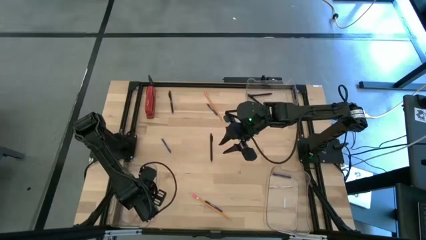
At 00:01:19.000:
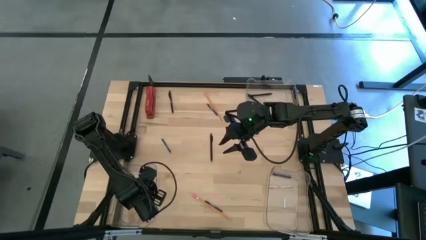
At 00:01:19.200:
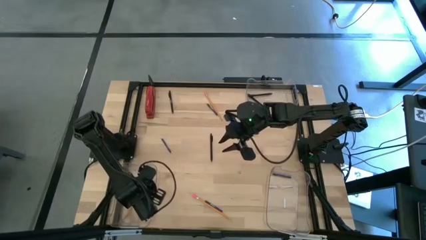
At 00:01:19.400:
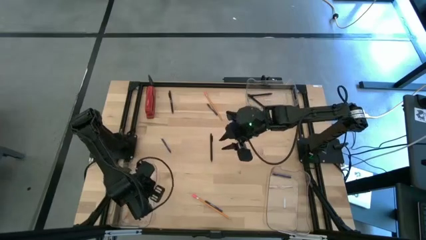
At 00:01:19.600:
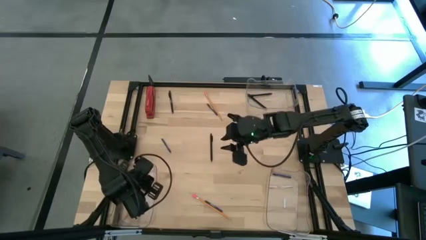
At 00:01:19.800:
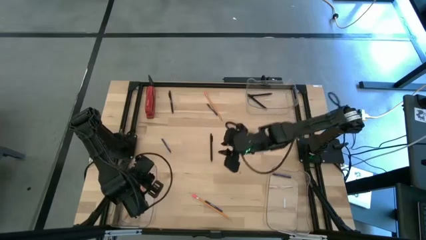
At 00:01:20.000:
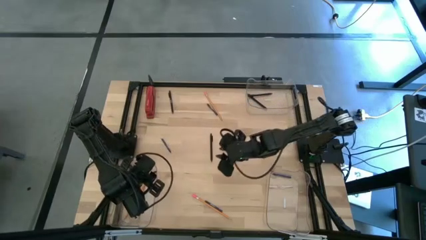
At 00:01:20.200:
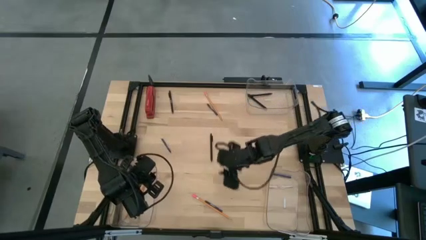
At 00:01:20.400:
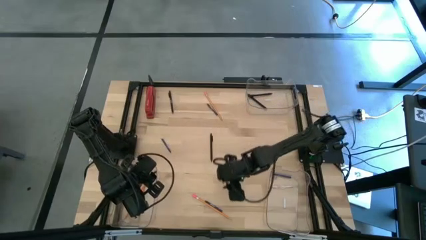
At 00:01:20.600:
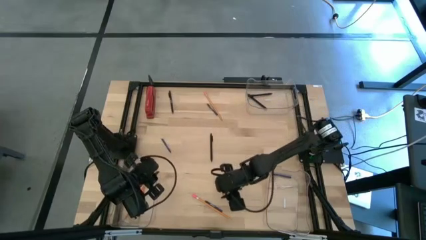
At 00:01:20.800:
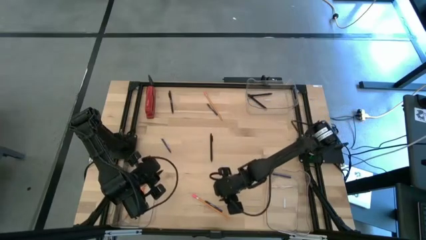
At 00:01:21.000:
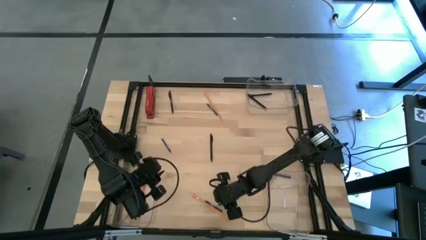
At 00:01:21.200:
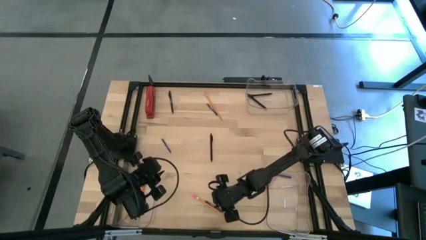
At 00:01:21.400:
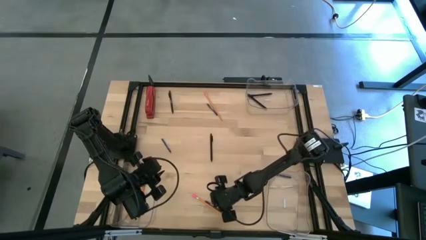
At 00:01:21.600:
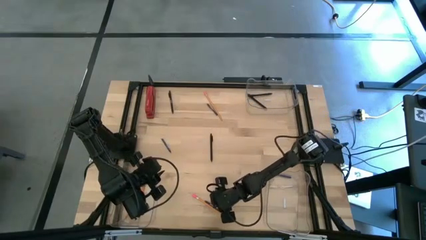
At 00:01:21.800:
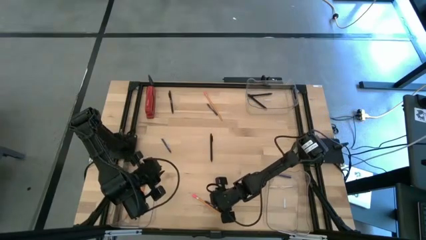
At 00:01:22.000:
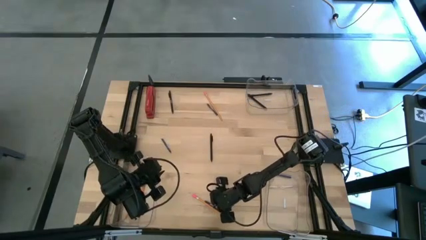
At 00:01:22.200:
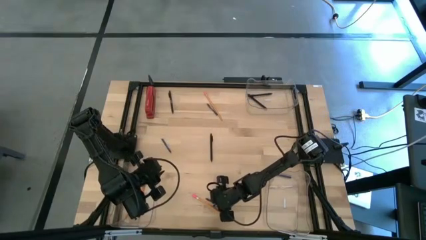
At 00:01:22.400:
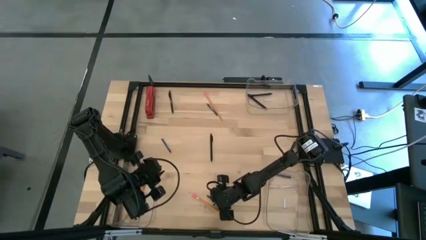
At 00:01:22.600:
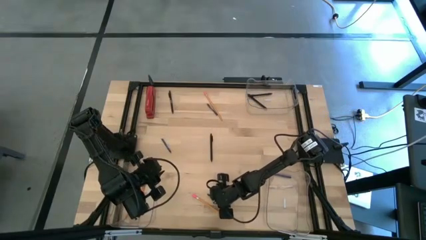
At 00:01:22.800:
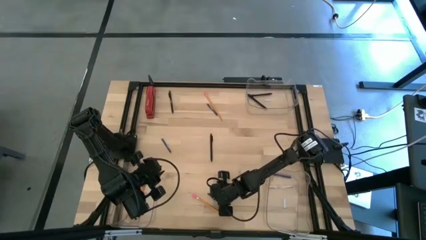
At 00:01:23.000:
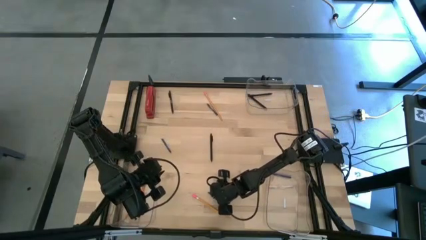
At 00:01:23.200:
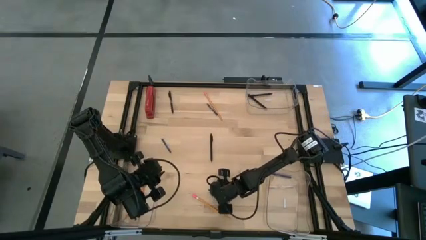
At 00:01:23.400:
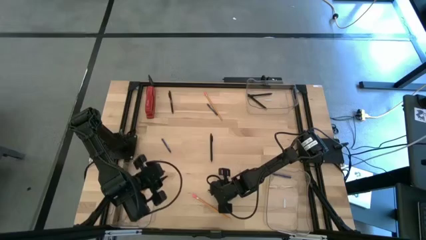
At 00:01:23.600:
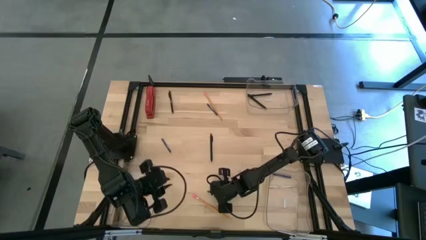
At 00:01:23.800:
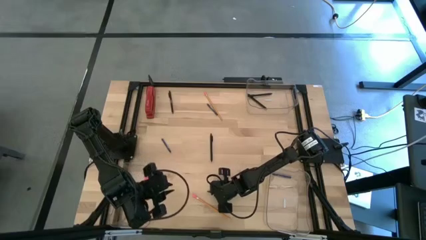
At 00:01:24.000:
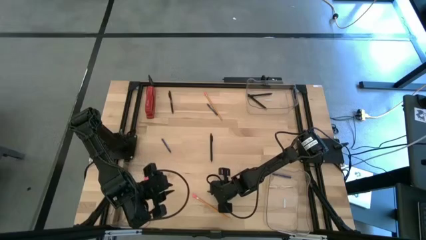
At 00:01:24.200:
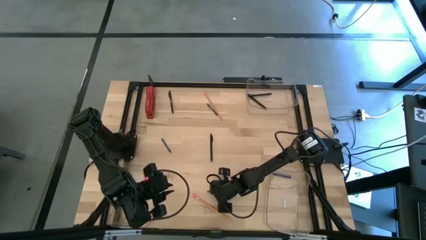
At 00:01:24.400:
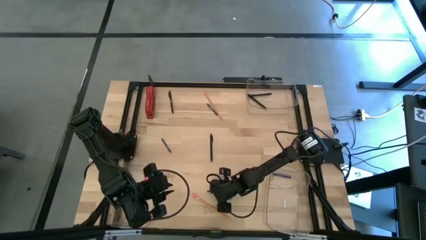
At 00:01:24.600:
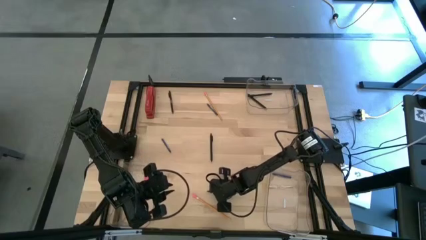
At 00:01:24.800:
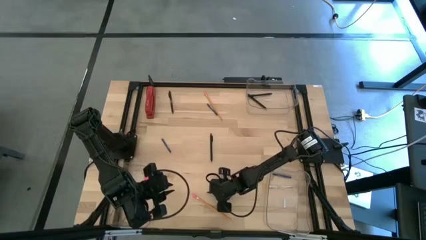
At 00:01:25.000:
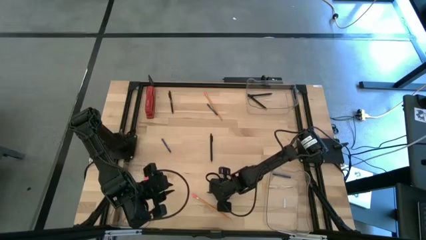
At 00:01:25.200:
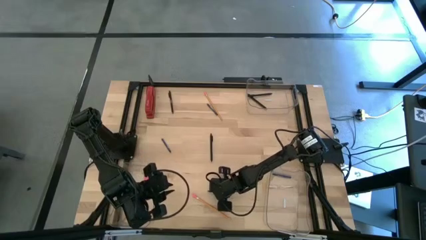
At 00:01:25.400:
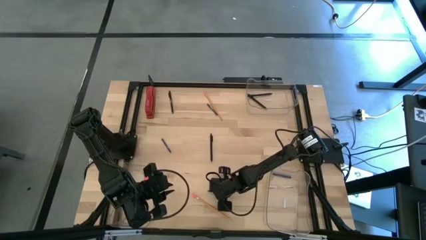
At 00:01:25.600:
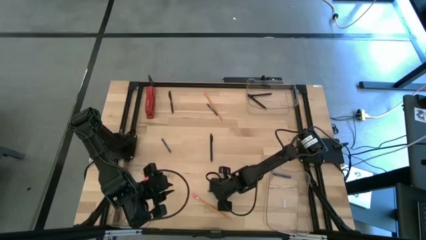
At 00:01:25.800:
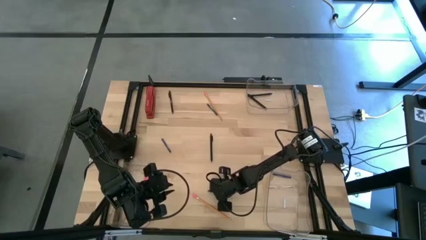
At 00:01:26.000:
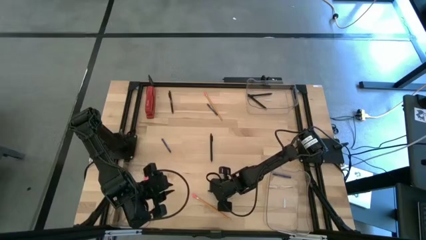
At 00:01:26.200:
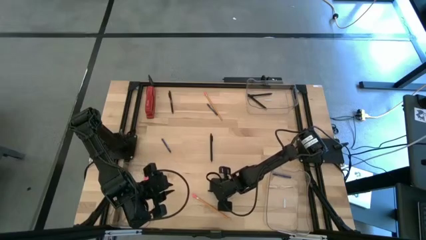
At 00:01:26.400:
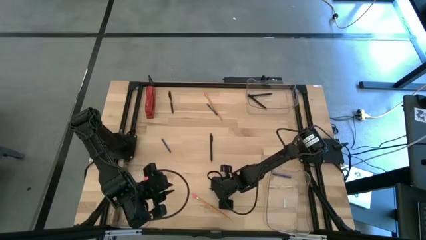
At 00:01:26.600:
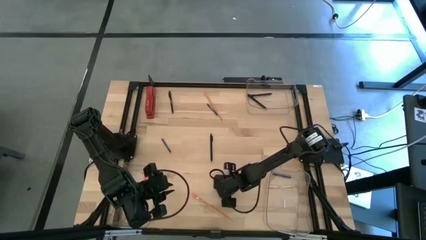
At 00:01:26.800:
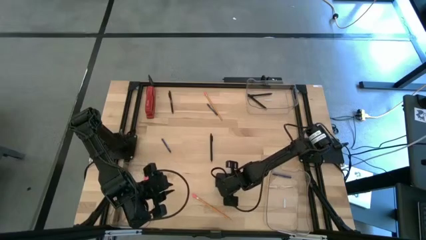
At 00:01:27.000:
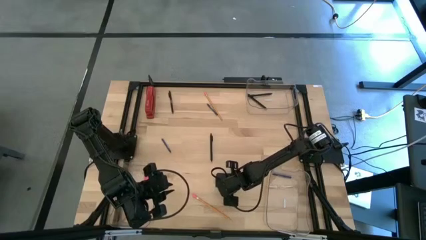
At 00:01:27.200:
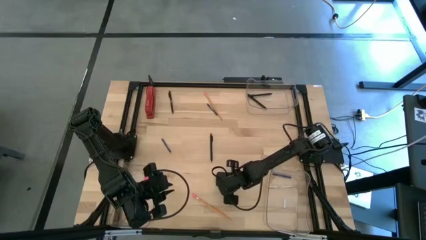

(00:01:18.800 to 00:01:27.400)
Task: Sort crayons/erasers/pens/pencils in bins
Put the blue crayon into the bottom right transparent bin

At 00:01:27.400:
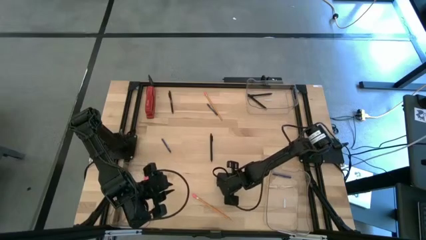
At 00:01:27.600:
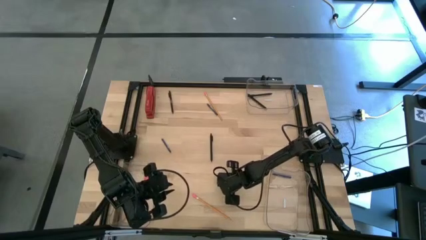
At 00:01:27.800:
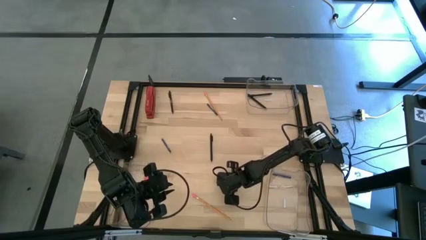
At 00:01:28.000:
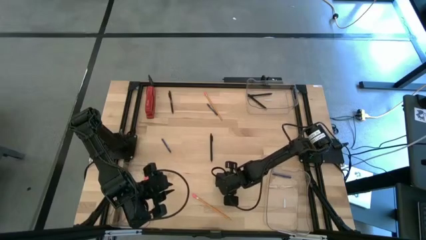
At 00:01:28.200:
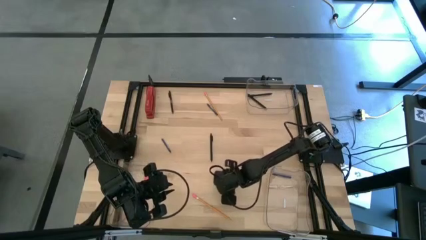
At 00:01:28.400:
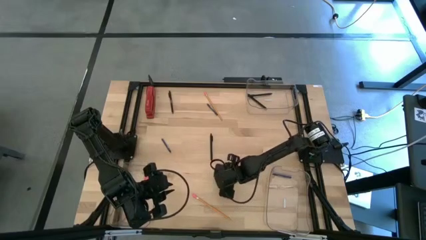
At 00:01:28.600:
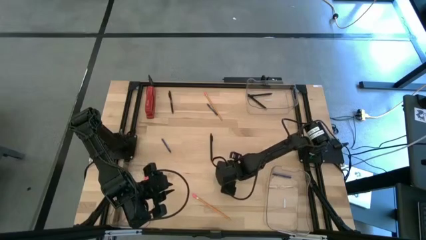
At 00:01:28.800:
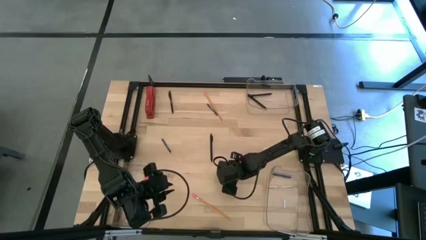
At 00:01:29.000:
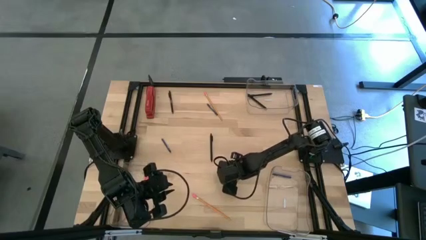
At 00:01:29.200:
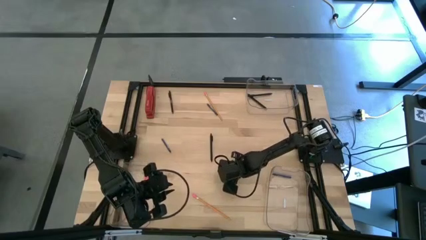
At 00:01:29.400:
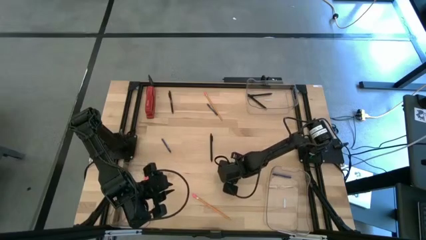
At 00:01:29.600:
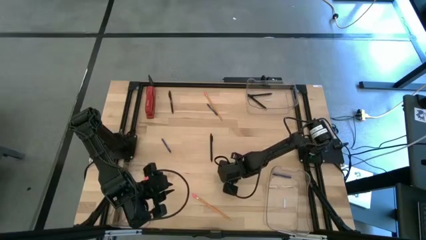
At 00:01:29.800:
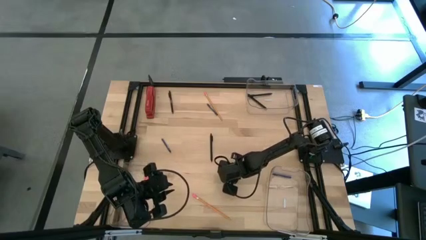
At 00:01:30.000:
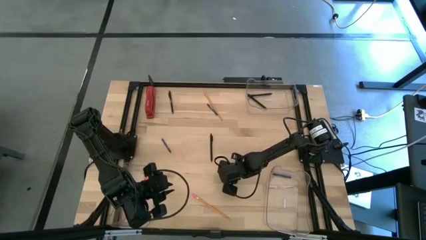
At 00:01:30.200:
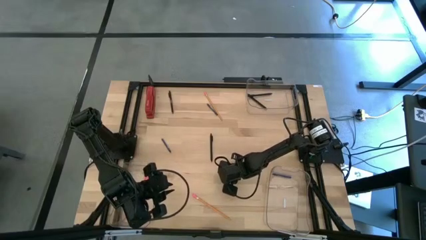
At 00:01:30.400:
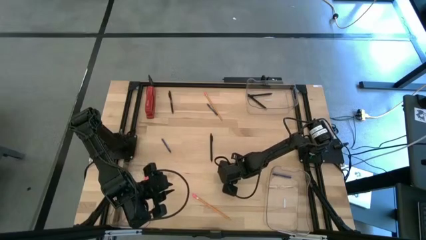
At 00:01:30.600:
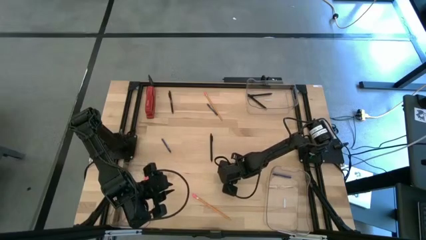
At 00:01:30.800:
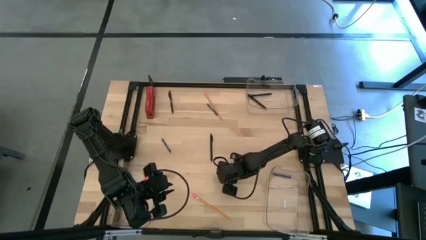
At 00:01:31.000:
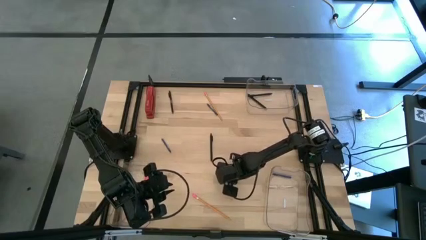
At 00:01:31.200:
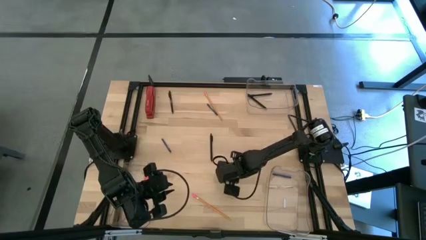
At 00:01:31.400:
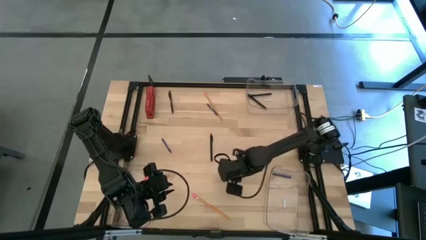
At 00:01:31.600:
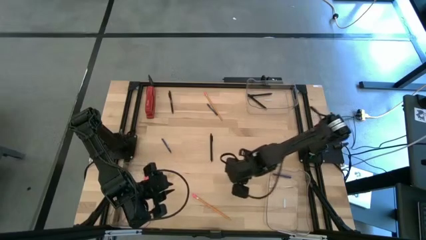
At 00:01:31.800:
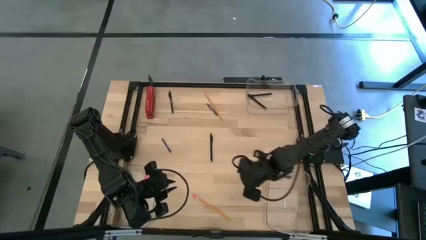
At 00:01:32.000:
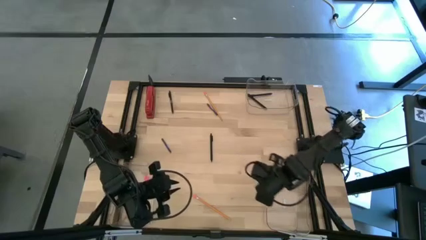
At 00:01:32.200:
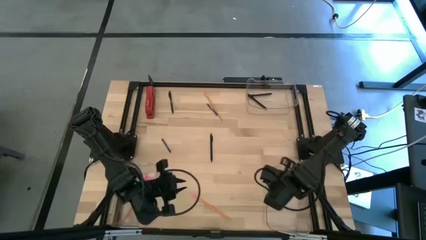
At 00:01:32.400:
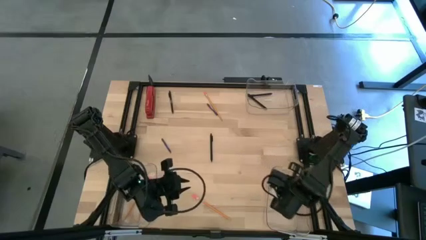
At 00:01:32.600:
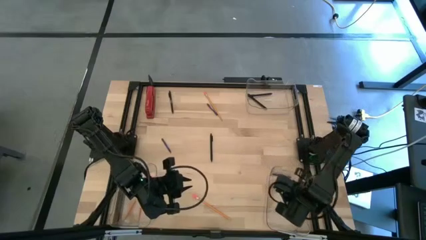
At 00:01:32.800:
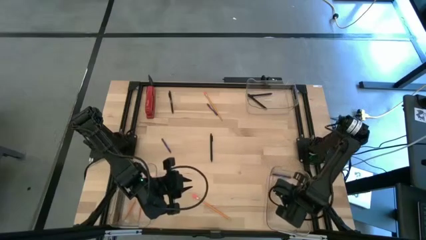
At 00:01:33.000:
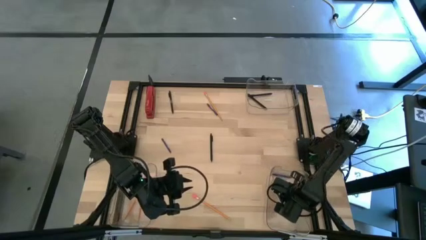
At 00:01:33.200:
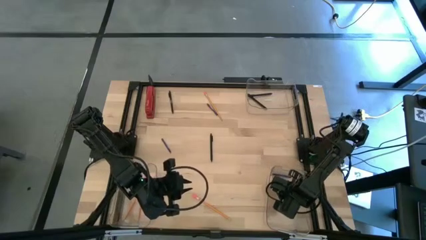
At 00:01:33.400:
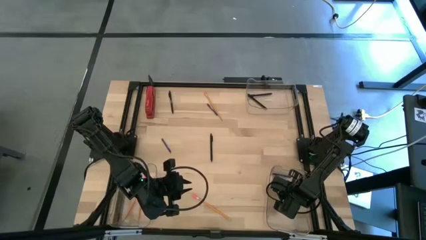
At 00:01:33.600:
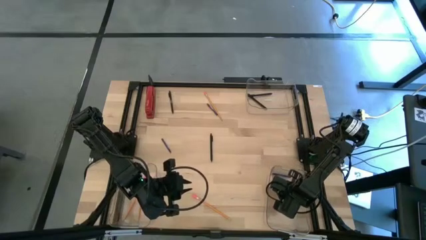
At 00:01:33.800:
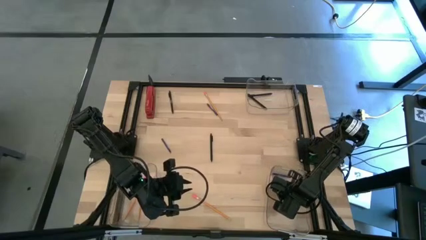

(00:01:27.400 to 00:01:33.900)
Put the blue crayon into the bottom right transparent bin
